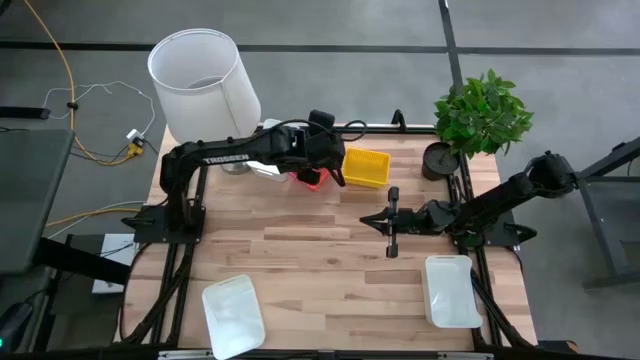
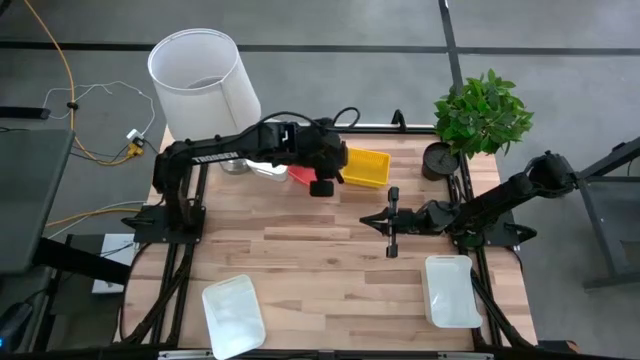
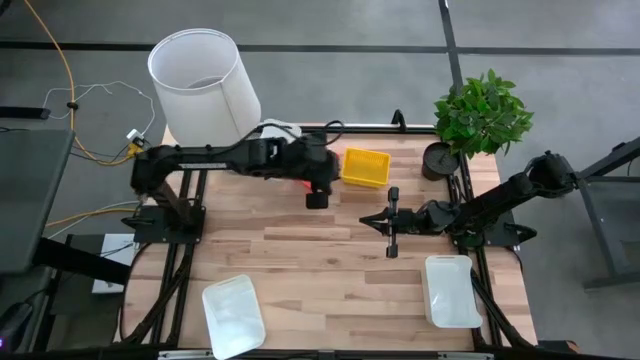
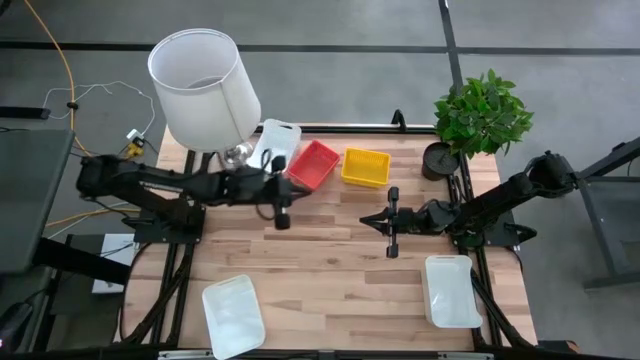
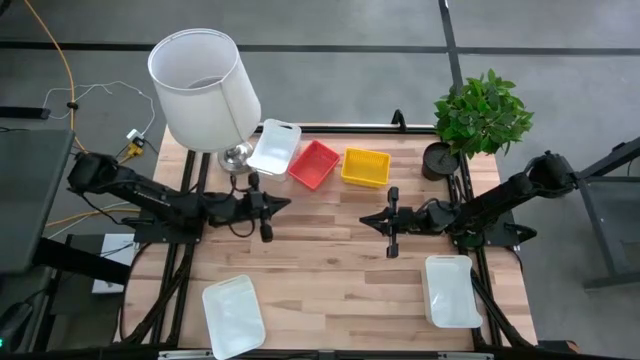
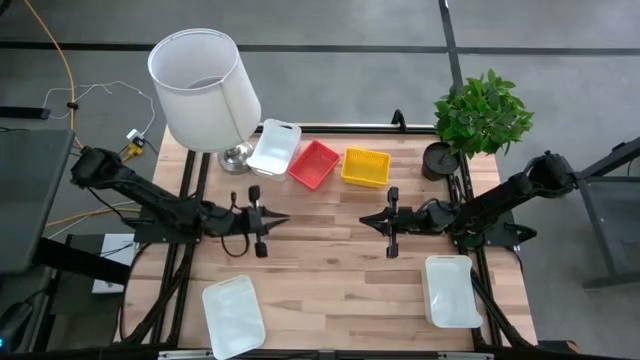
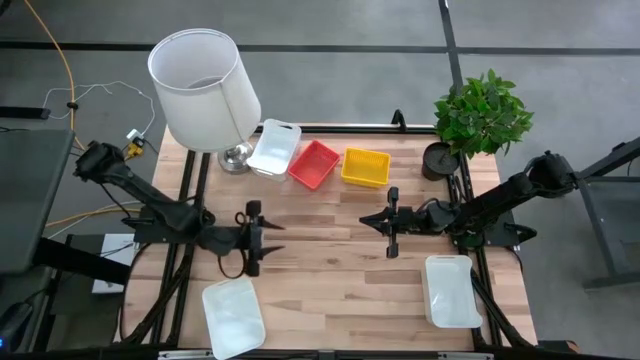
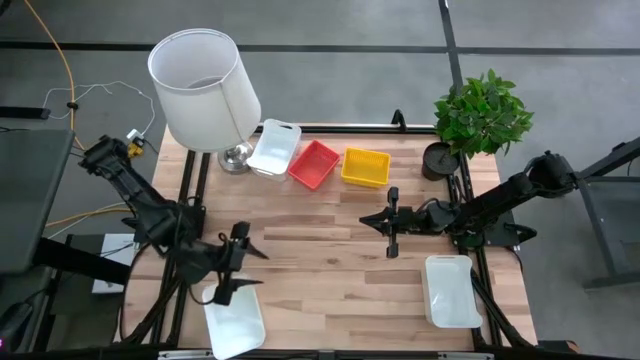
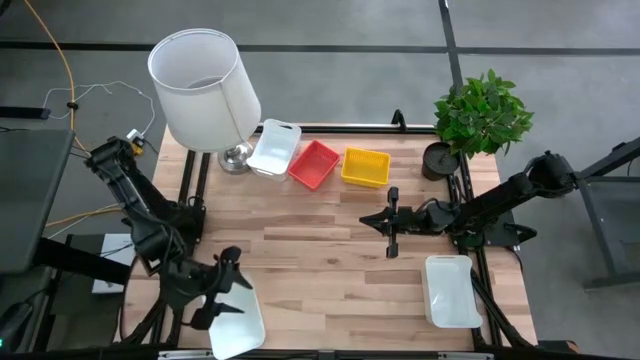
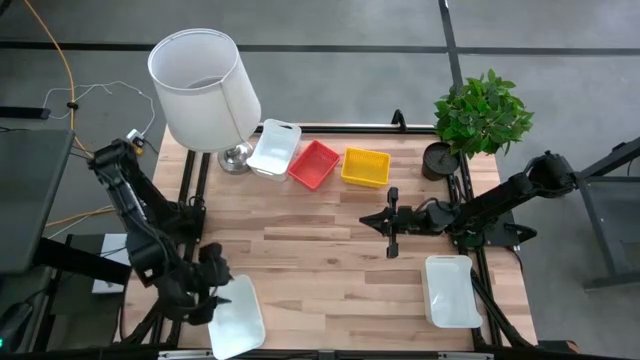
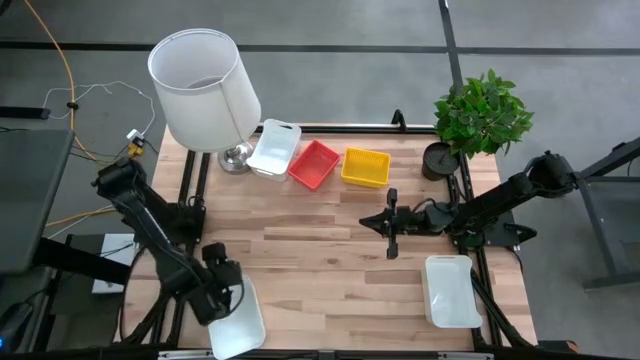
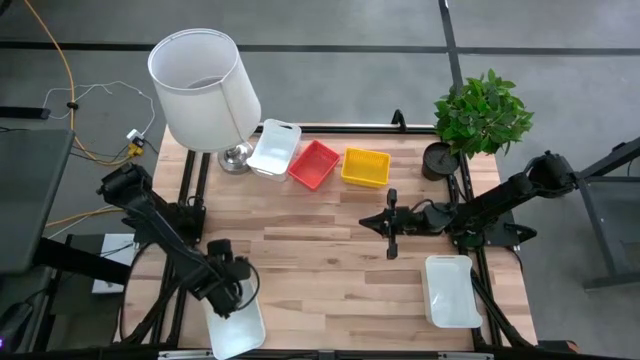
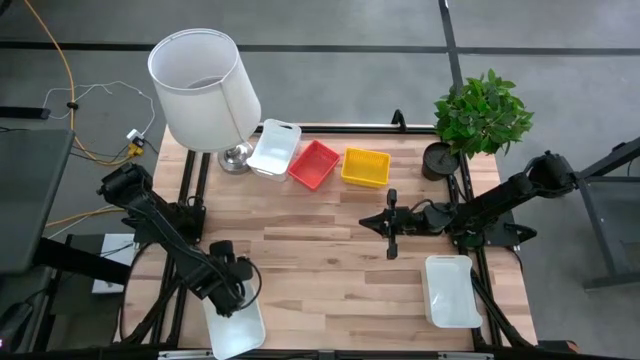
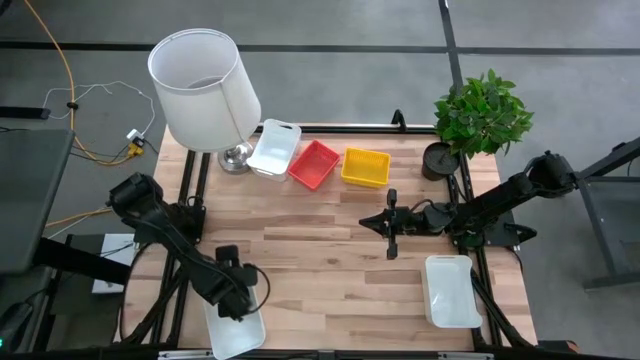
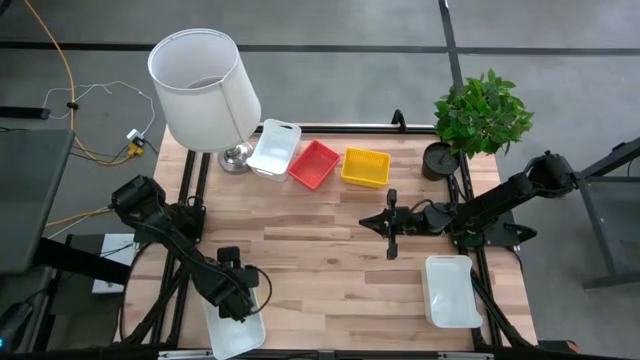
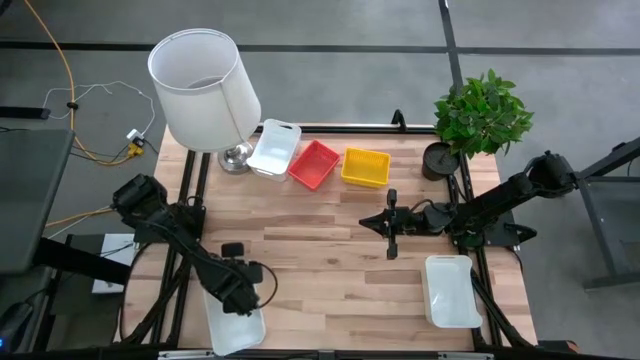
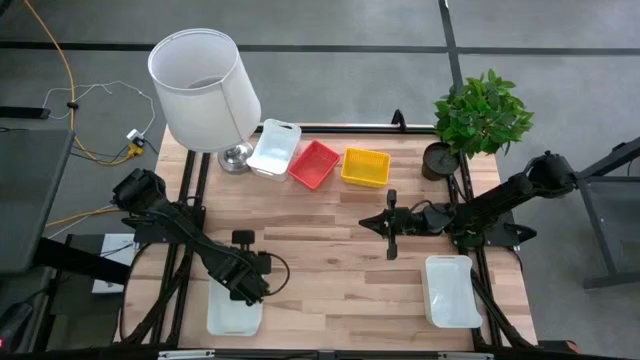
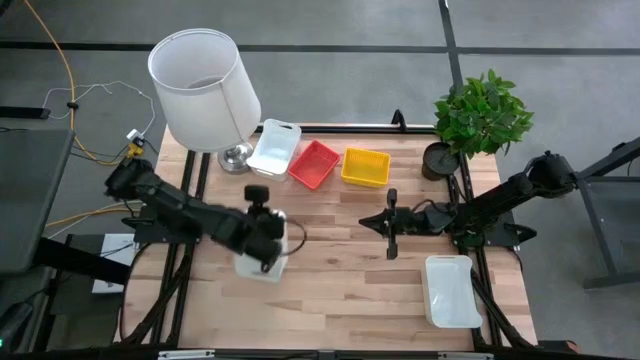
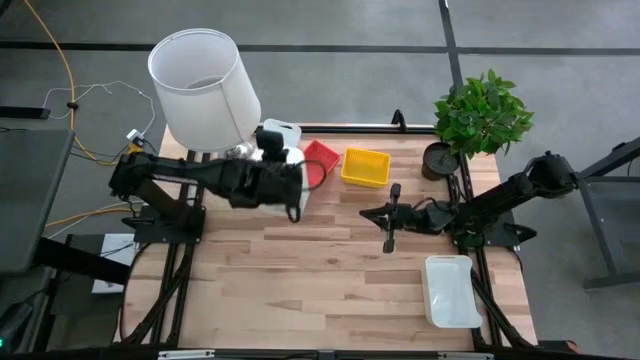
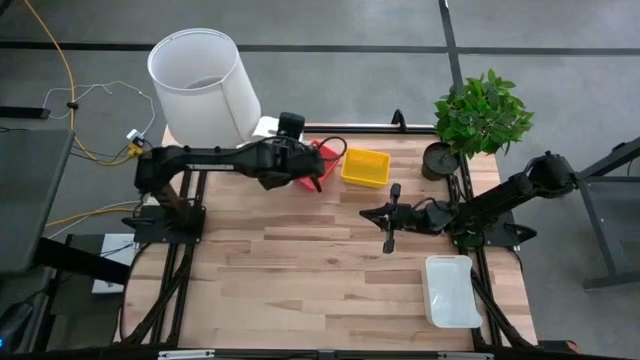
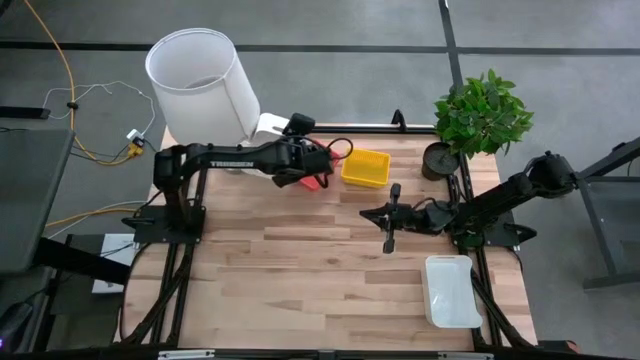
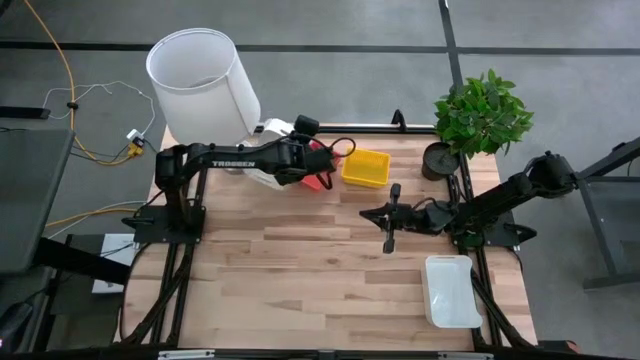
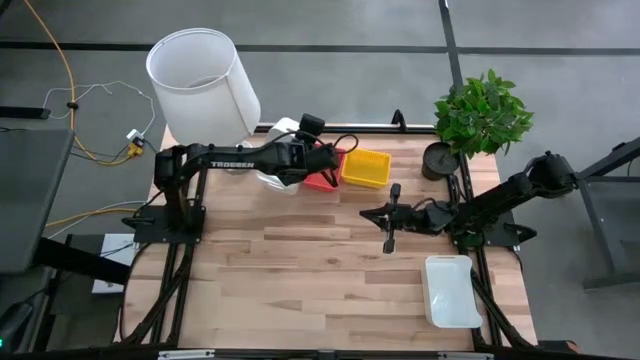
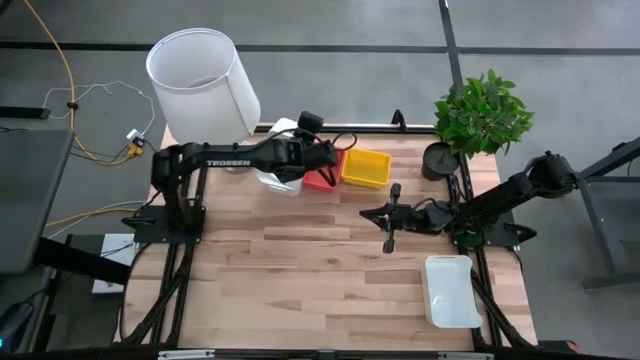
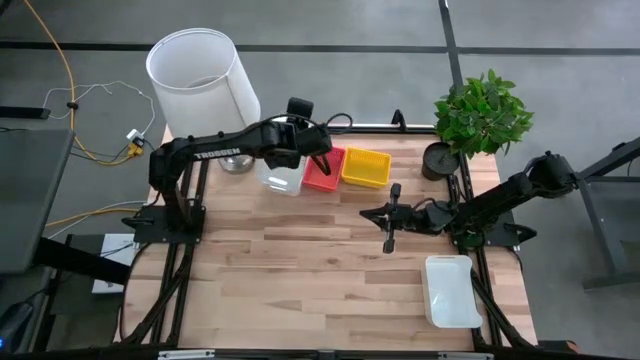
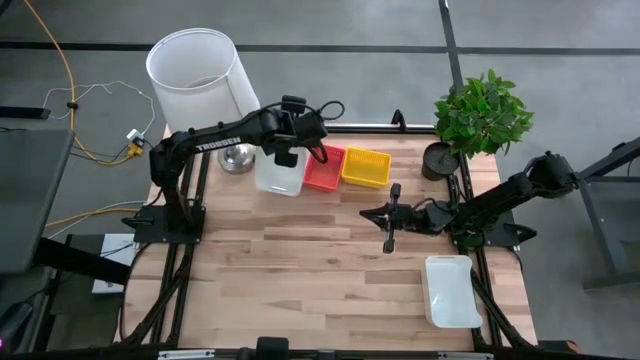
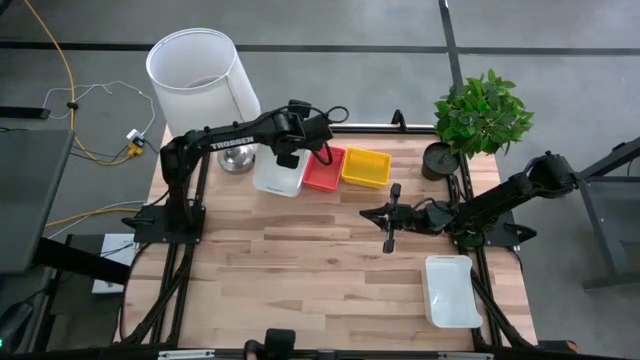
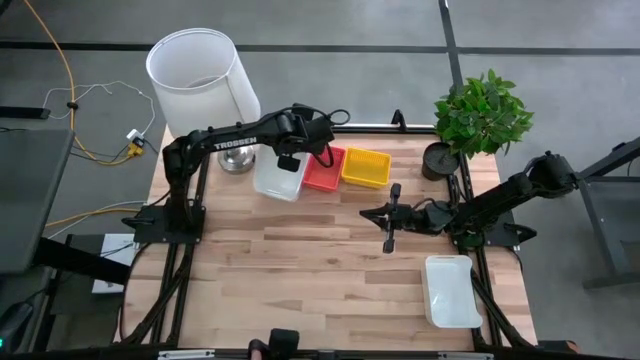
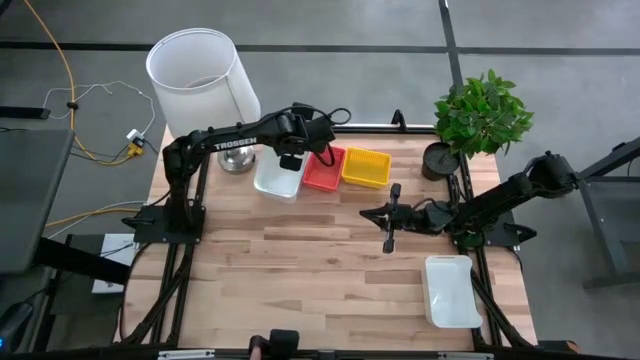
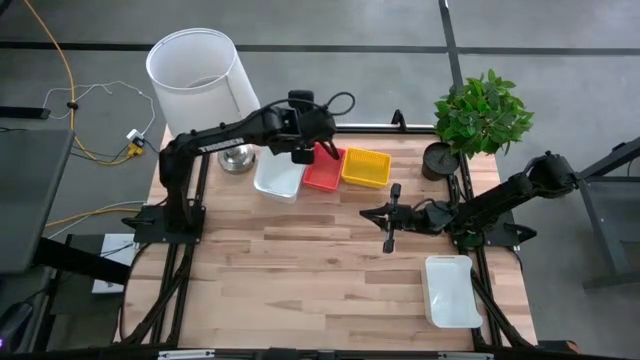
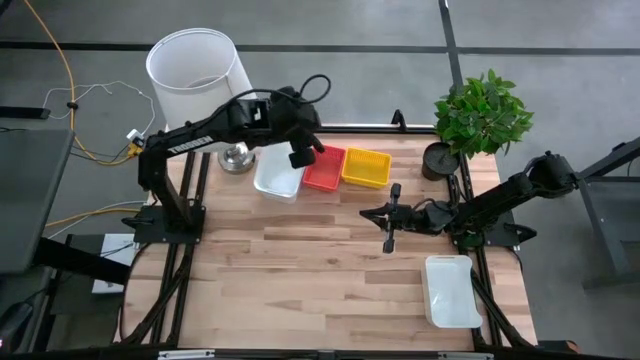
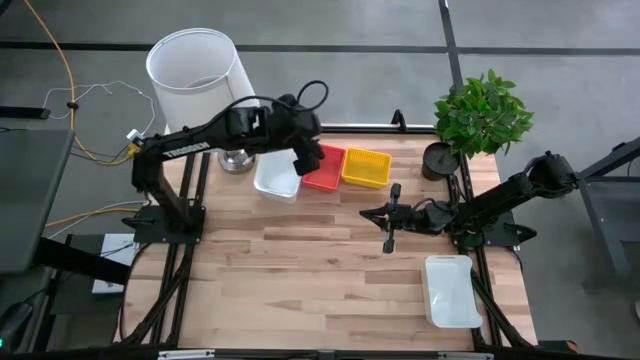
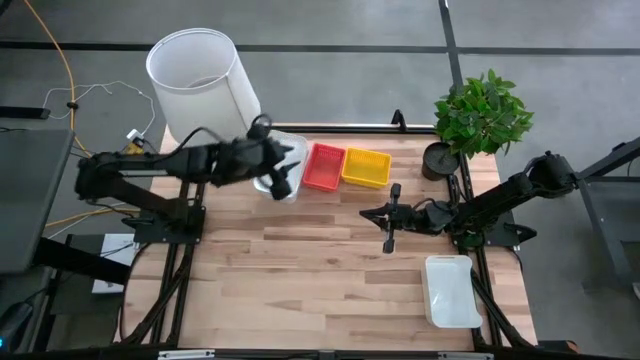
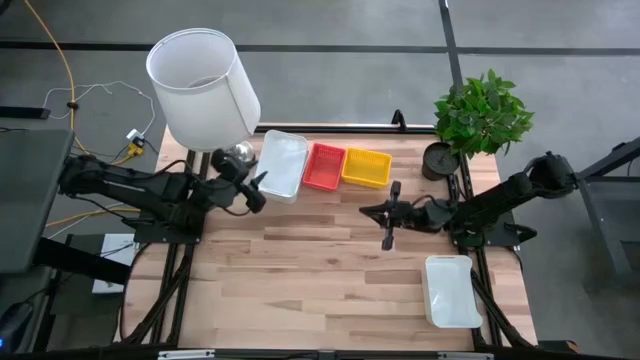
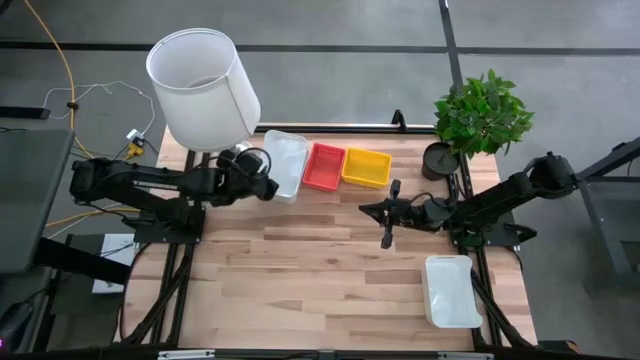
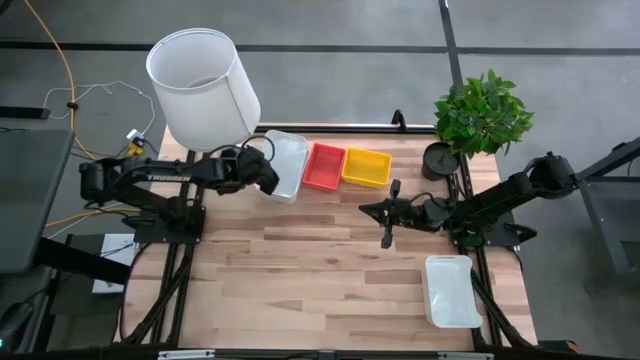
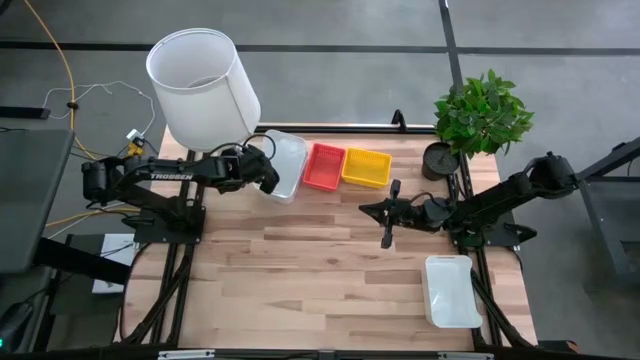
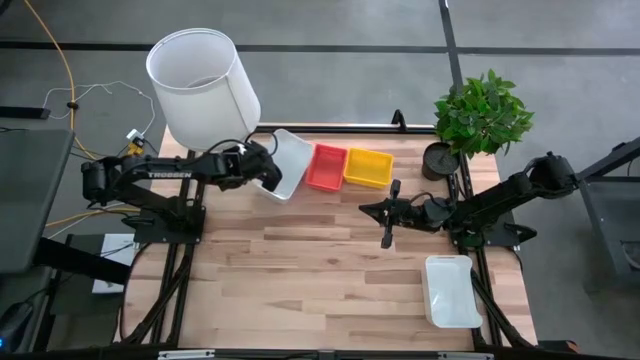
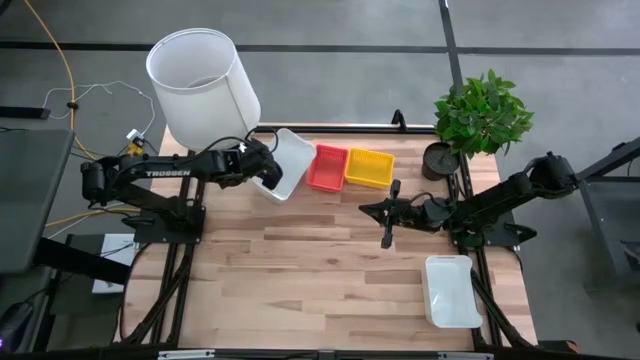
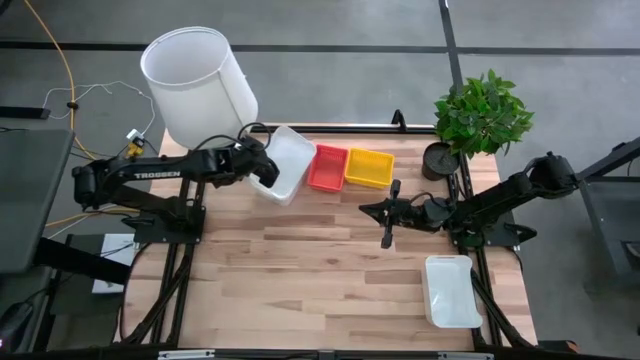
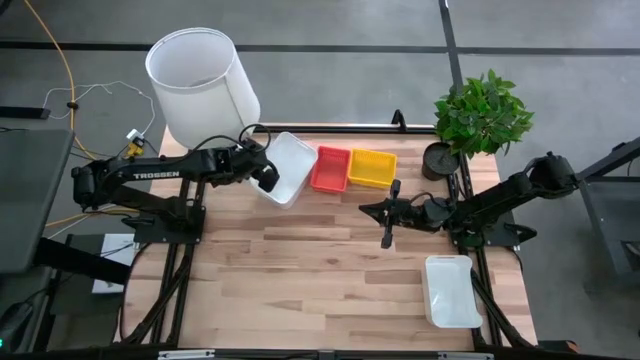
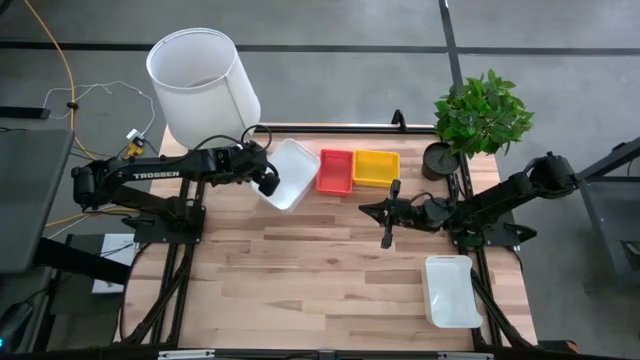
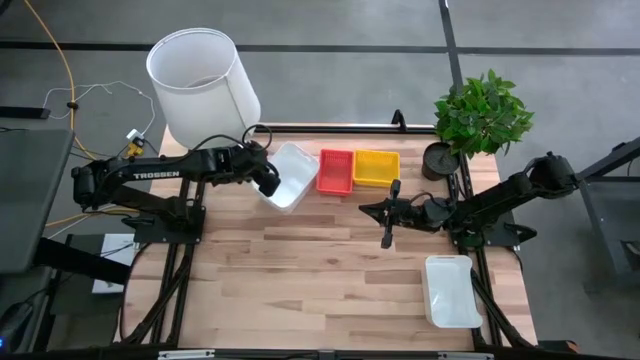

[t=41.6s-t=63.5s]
Stack the bottom left white bin on the top white bin
